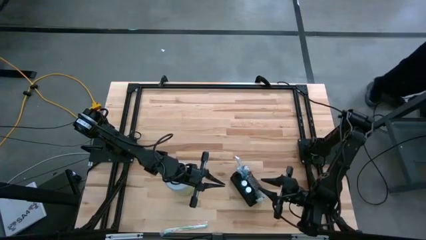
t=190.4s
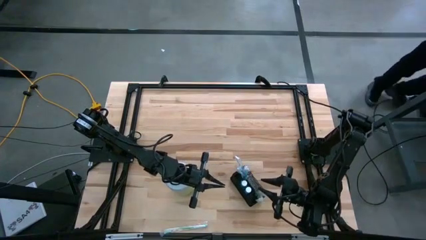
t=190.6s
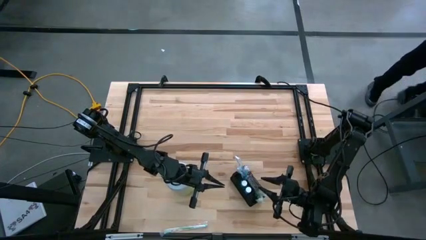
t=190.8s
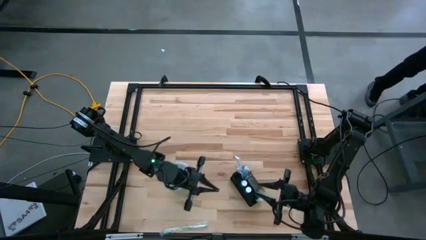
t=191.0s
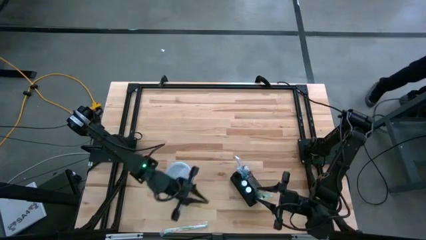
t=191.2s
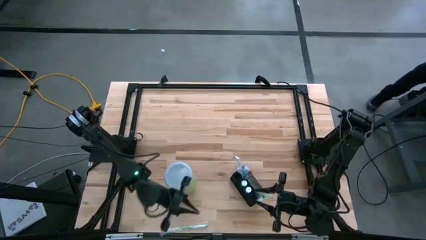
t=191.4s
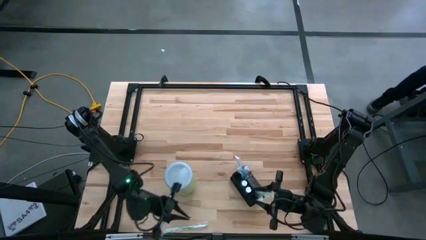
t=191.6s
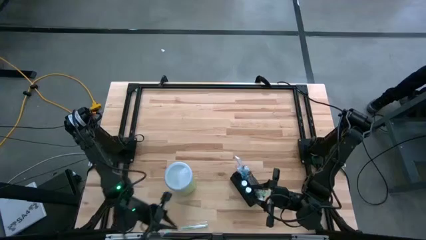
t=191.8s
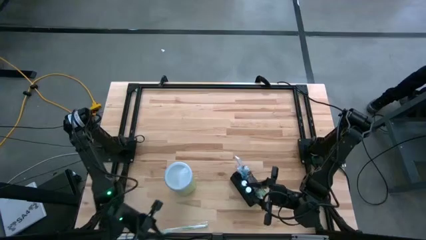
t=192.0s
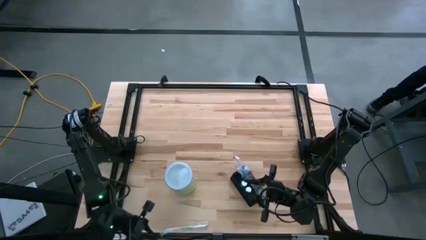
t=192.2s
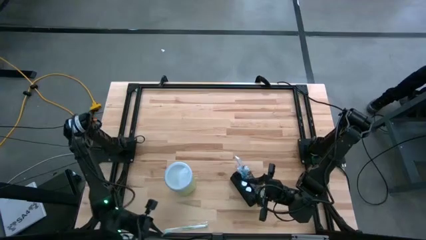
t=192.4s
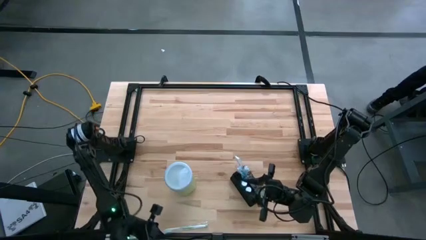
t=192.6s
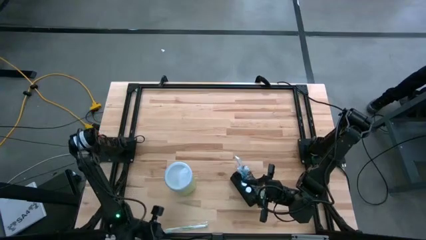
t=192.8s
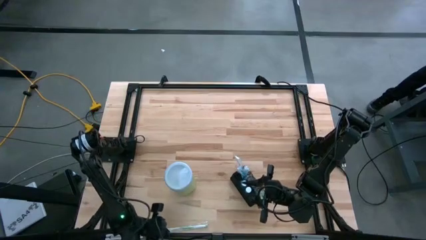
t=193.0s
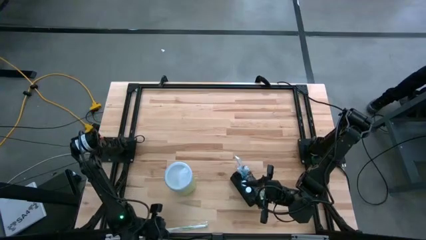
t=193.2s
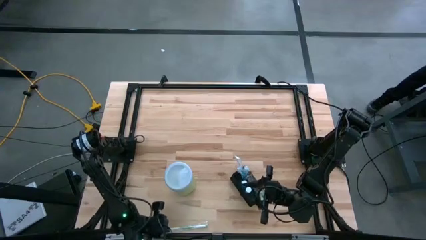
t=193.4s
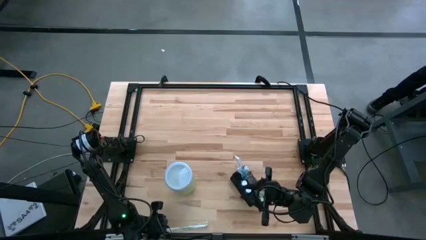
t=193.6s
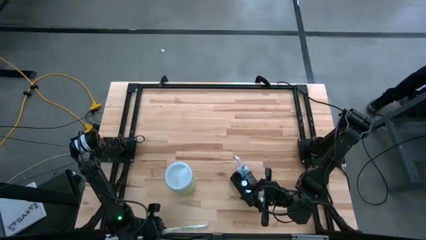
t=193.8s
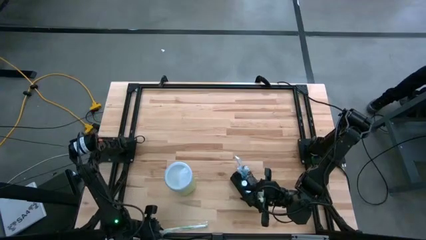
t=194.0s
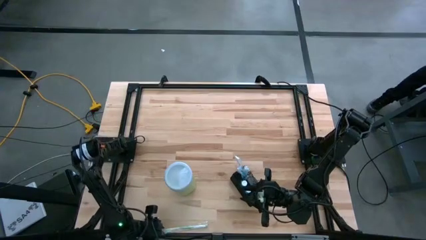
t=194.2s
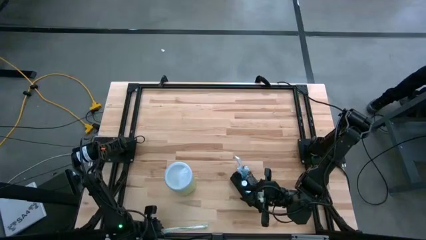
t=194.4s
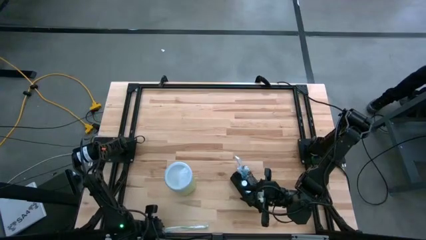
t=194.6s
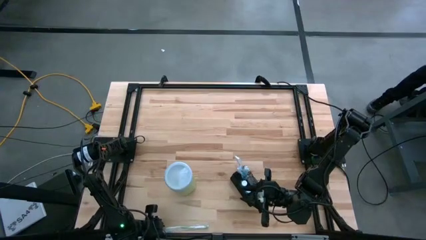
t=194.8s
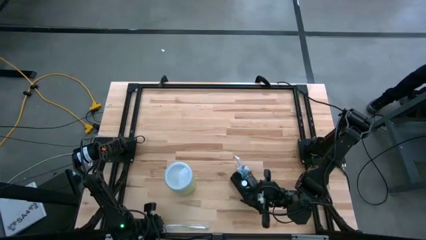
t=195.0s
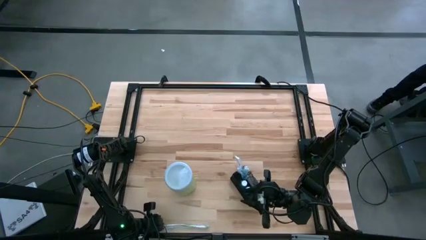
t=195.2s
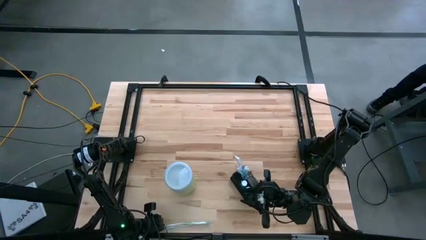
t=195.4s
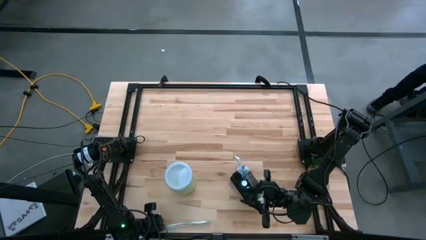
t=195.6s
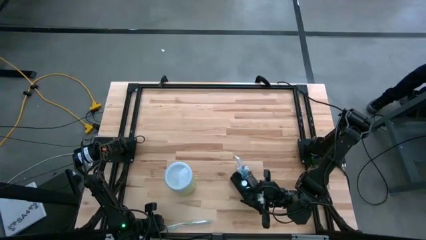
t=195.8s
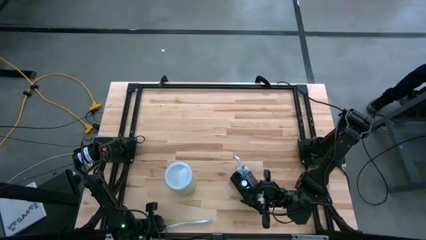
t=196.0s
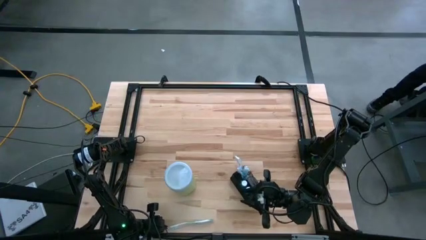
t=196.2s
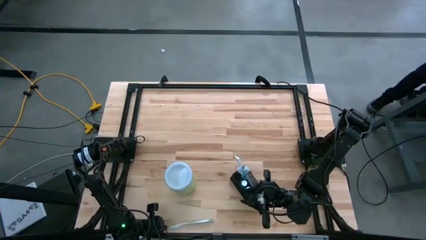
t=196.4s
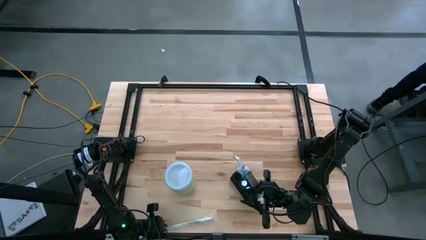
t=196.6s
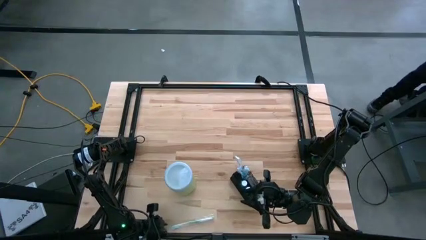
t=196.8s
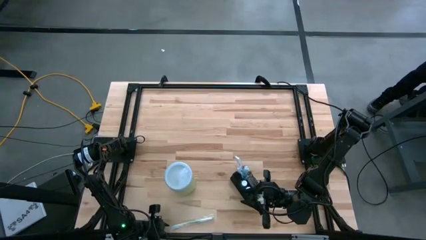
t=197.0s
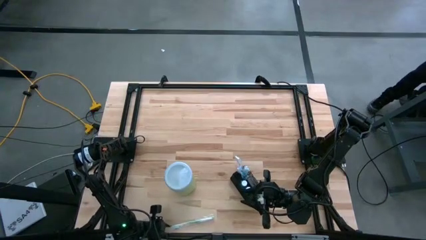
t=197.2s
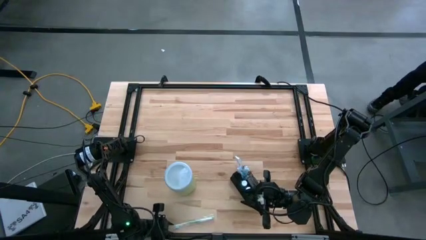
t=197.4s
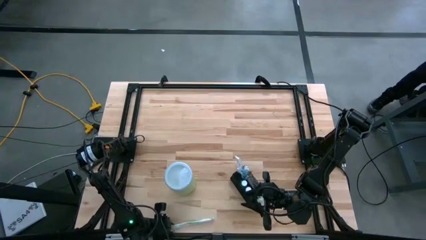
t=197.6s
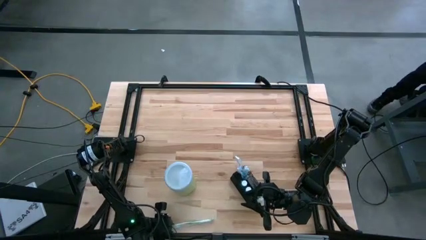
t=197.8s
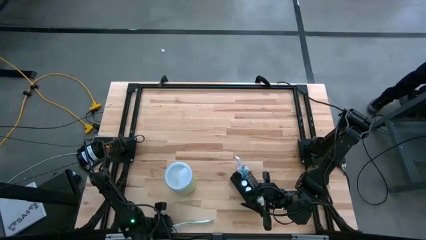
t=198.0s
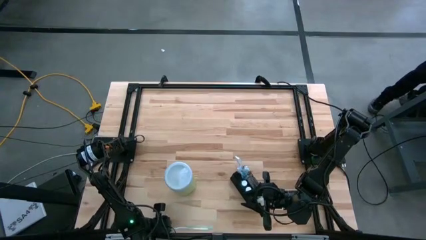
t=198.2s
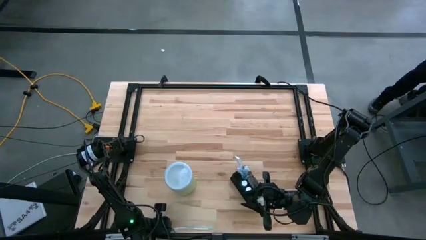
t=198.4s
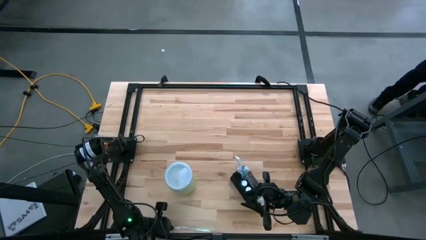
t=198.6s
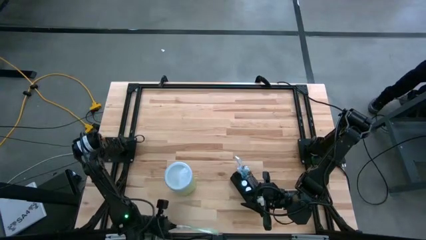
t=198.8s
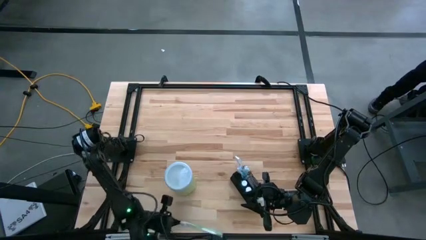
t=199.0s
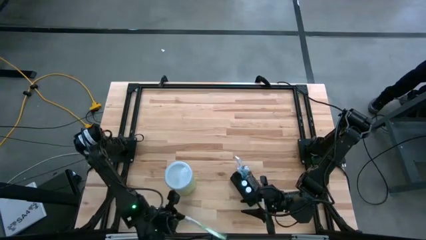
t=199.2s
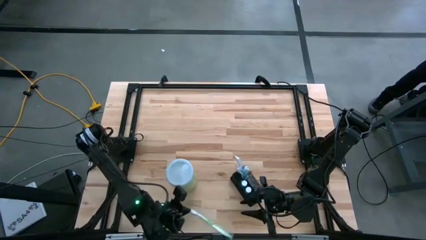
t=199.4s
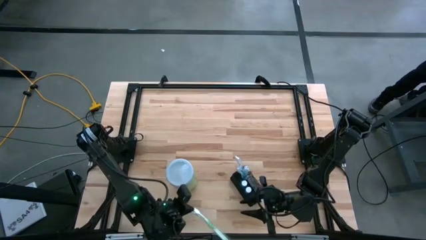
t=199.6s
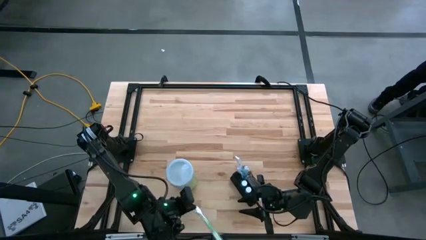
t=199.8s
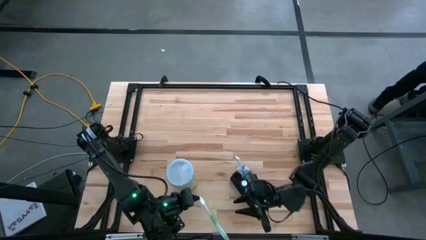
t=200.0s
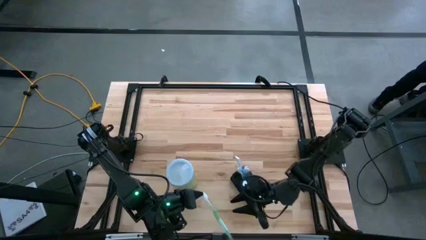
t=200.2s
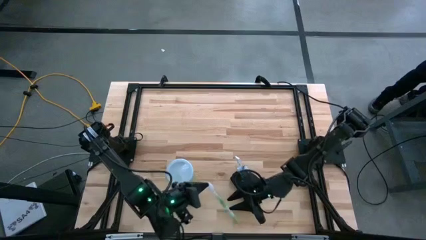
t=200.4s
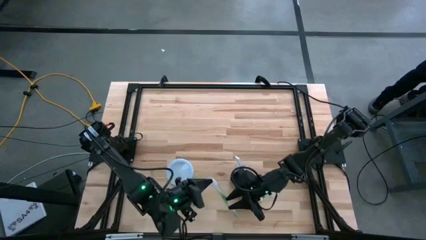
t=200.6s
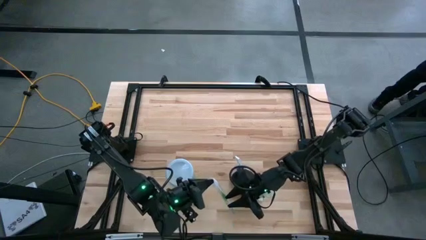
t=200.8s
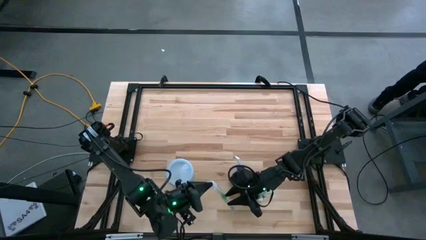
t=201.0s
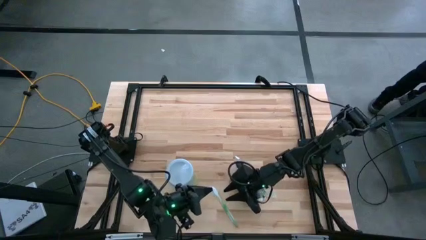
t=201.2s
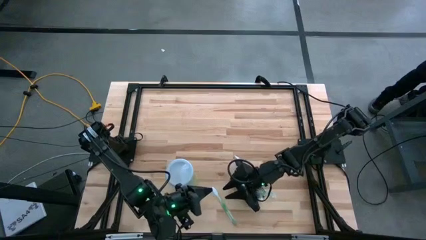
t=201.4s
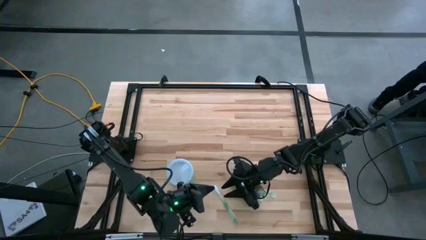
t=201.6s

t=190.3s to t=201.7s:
Task: Pick & Place toothbrushing station
Put the green toothbrush into the black mesh organizer

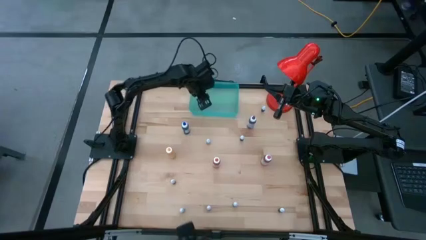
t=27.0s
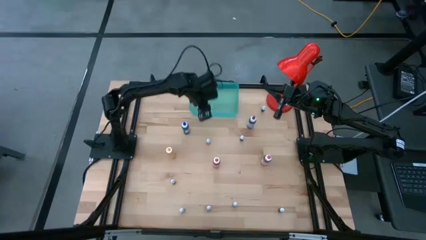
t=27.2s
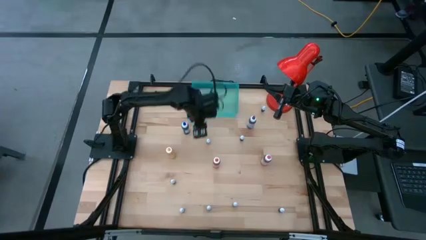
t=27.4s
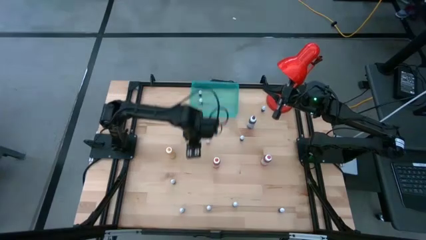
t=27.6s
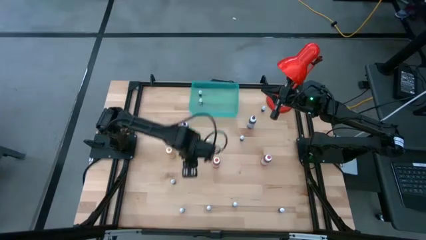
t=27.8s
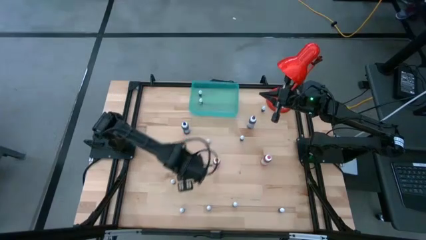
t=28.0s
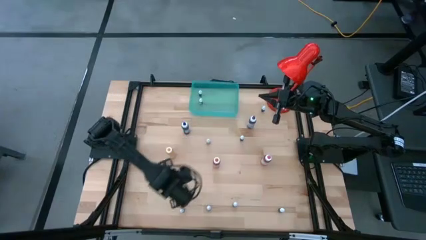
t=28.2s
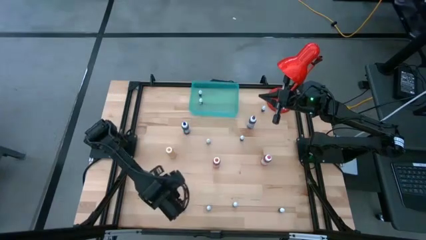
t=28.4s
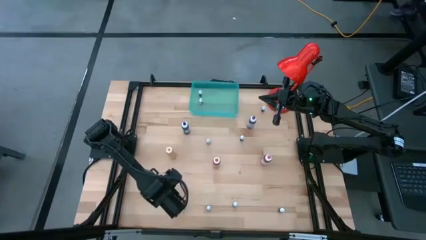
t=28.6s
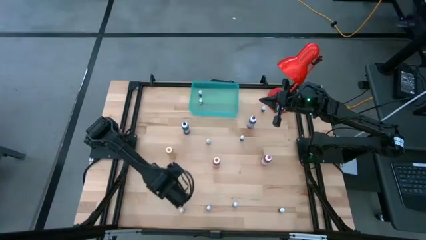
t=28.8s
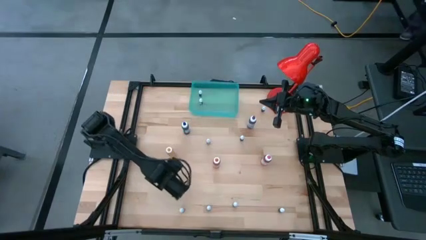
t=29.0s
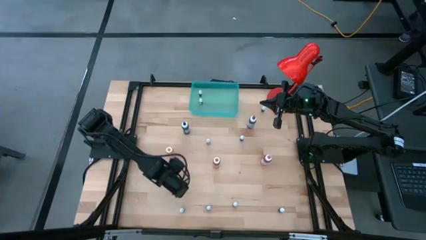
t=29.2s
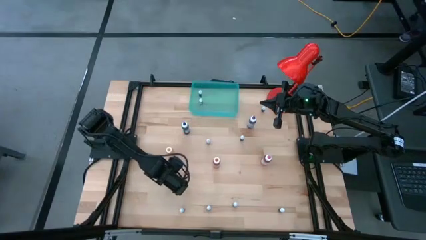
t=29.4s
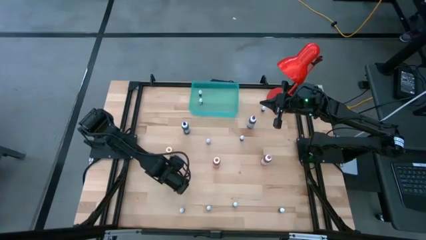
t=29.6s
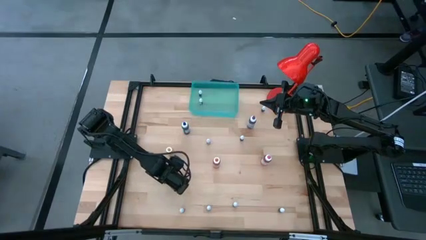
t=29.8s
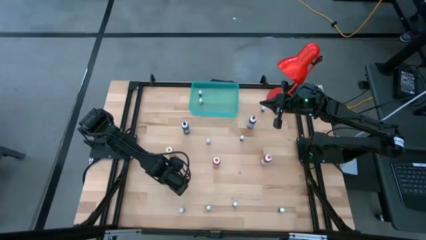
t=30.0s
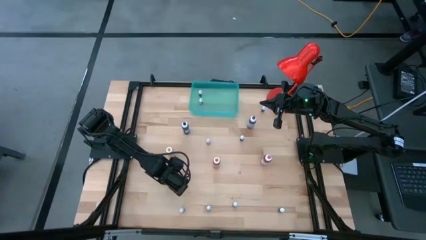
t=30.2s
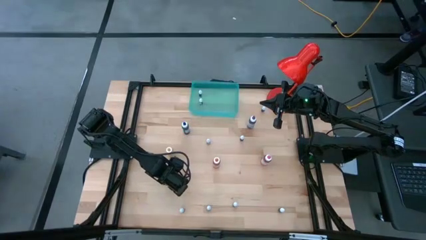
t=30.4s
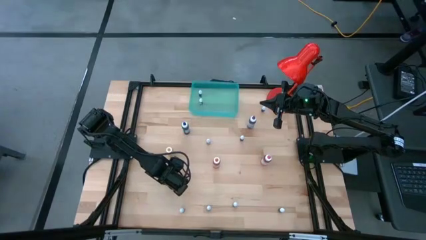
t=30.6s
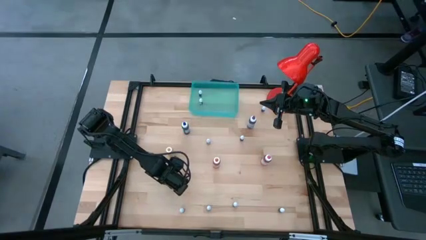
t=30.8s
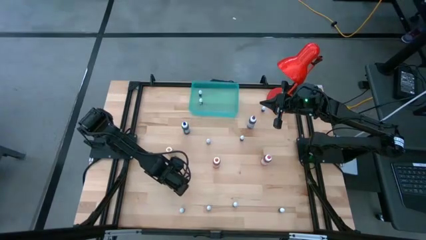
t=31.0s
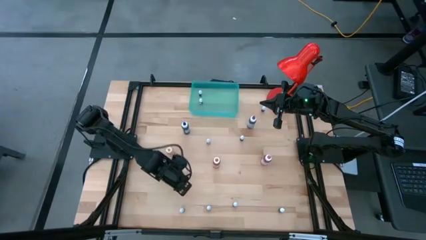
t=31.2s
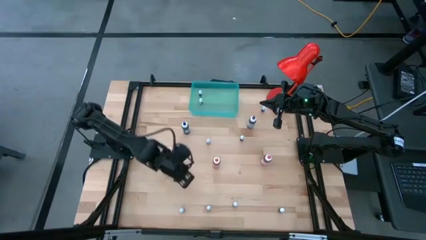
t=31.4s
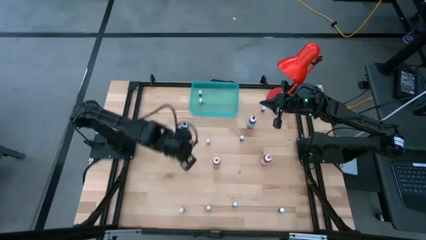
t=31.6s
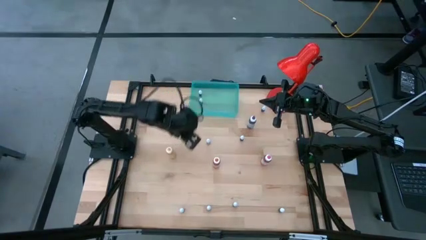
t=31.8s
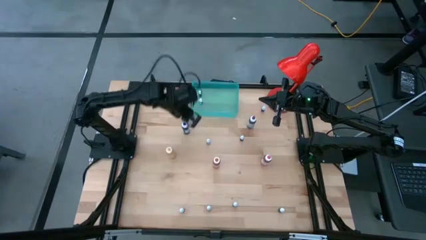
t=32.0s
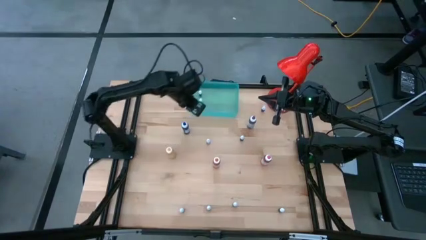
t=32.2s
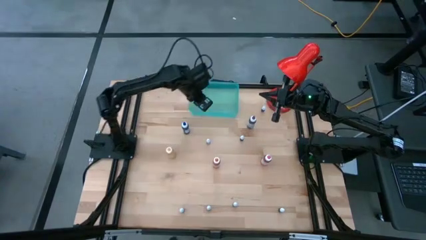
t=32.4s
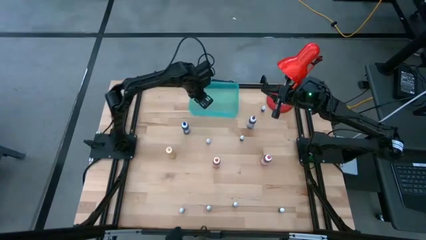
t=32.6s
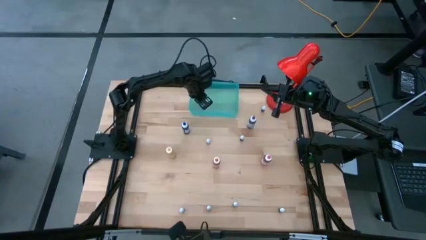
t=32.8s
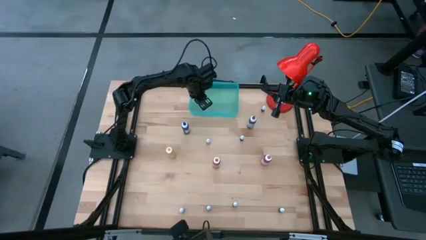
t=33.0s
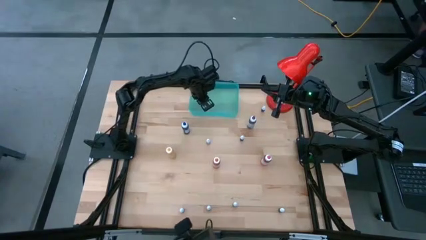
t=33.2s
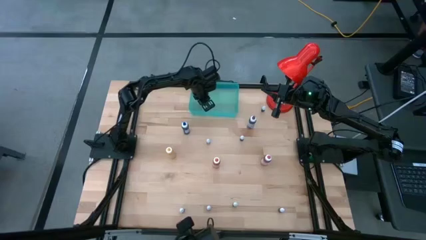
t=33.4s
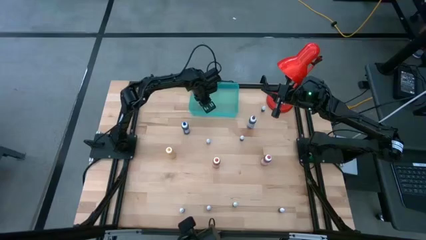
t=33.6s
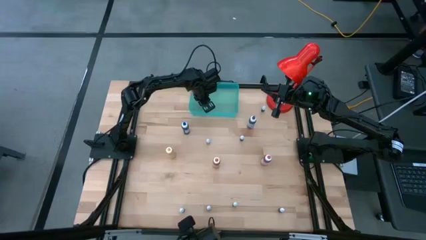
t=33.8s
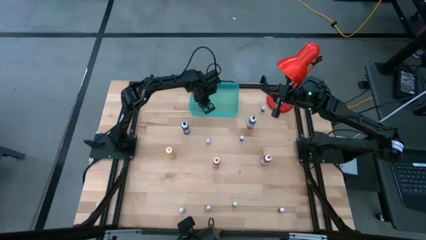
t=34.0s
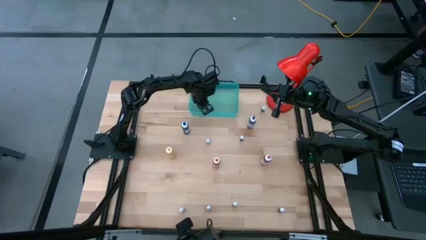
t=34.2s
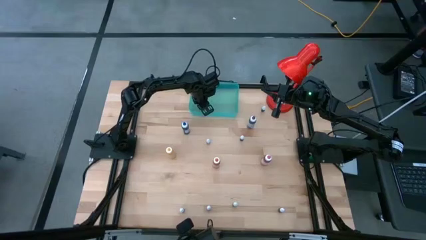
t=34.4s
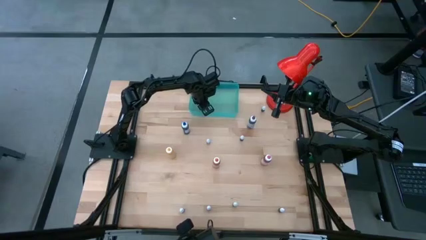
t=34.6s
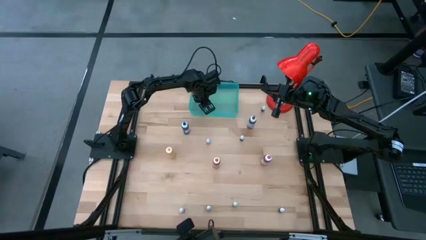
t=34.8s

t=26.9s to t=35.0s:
Task: Pick & Place food coloring
Put the bottom left red food coloring bottle into the bin
